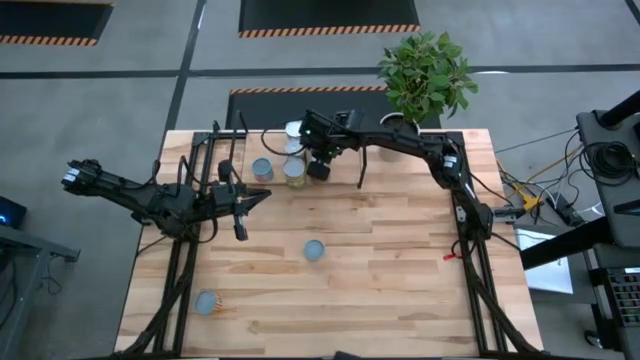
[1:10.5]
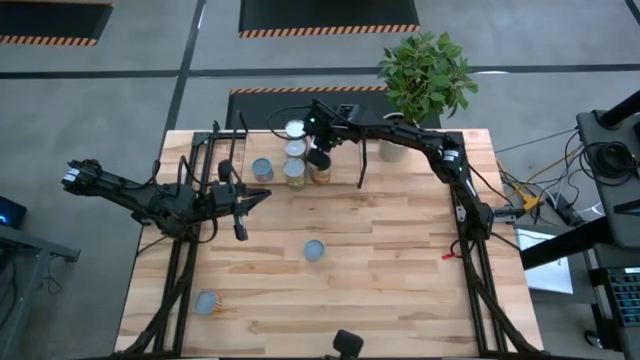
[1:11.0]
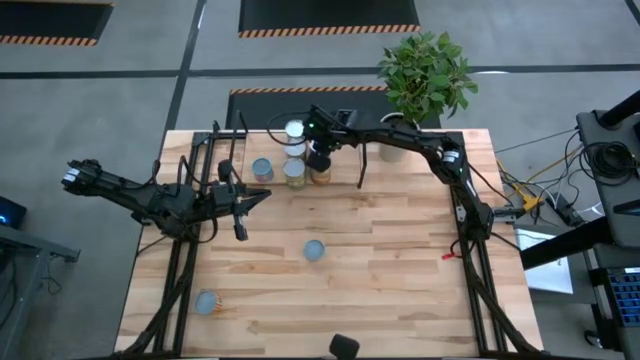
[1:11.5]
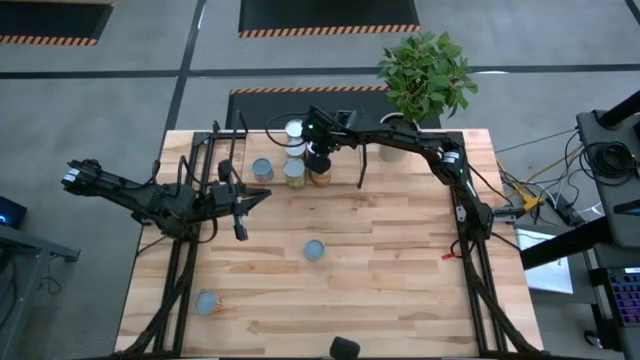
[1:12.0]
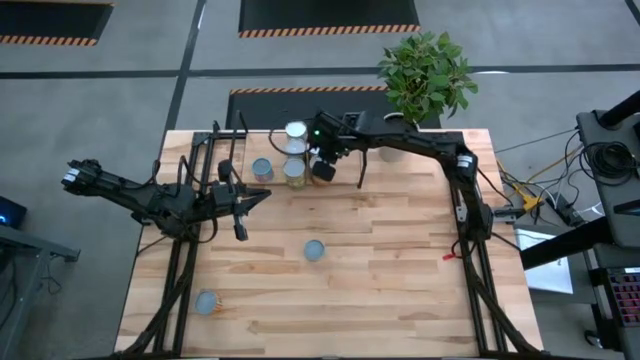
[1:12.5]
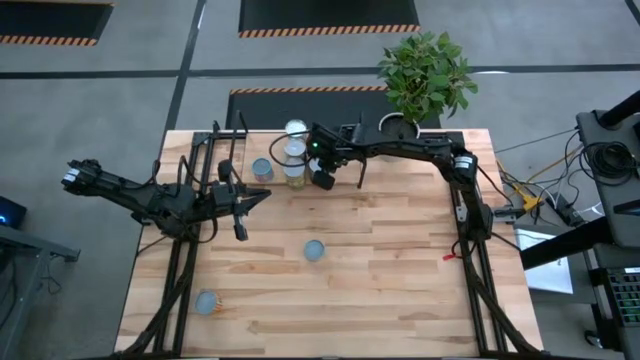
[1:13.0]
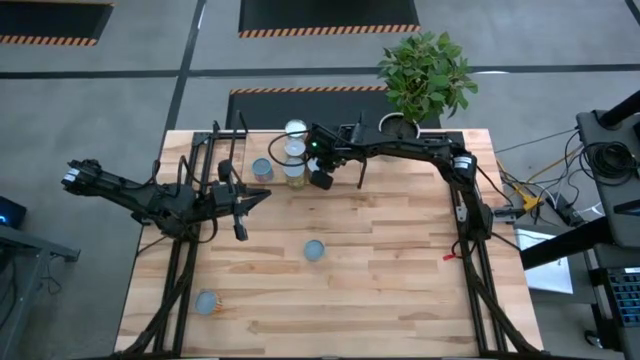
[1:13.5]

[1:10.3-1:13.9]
Task: Pick and place cans onto a shelf
Adjust the cans on the shelf

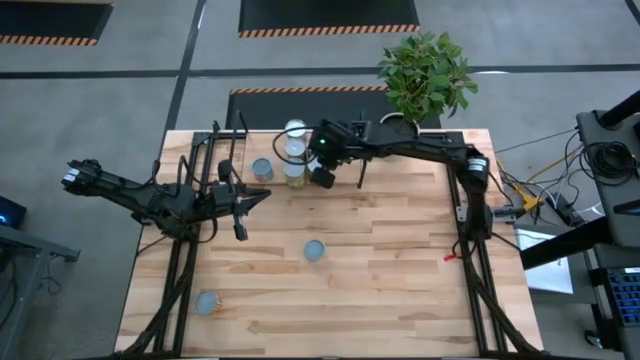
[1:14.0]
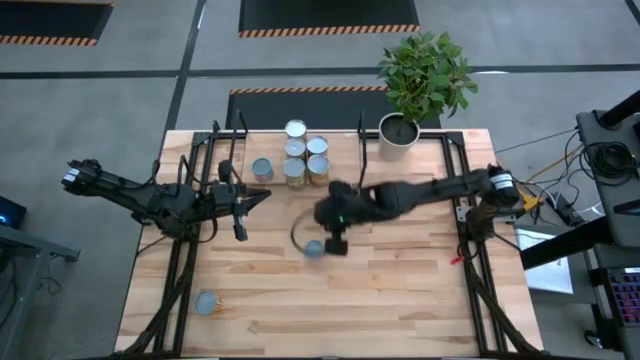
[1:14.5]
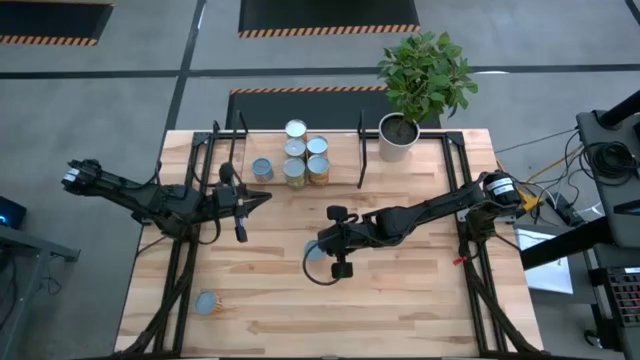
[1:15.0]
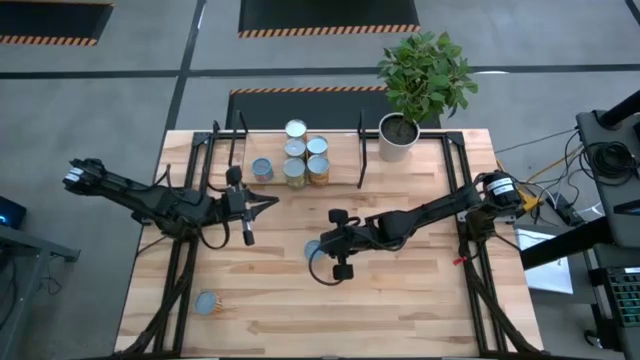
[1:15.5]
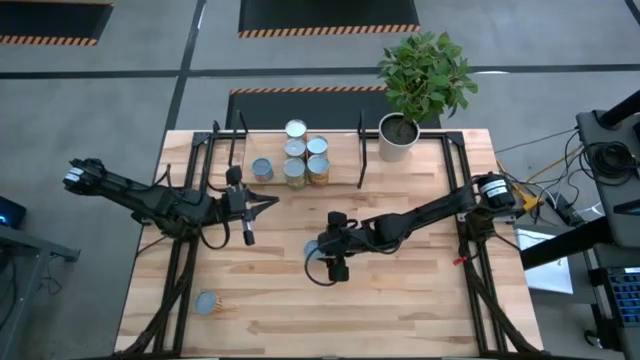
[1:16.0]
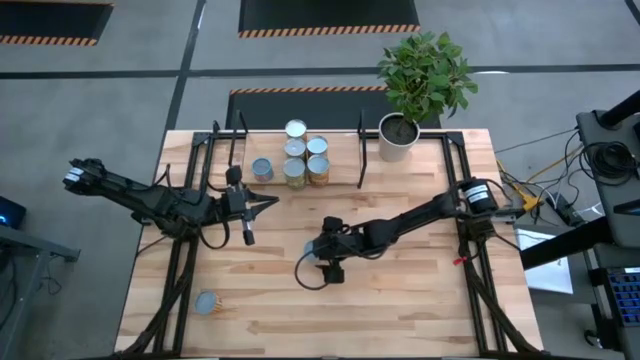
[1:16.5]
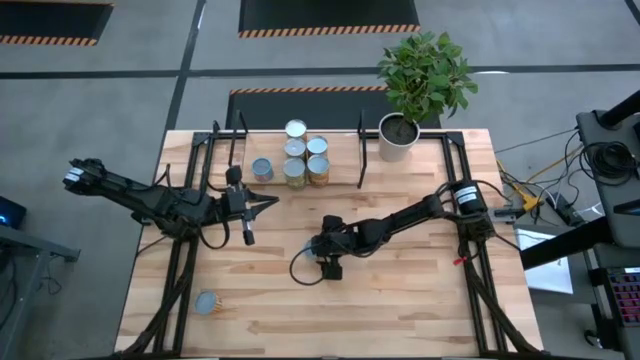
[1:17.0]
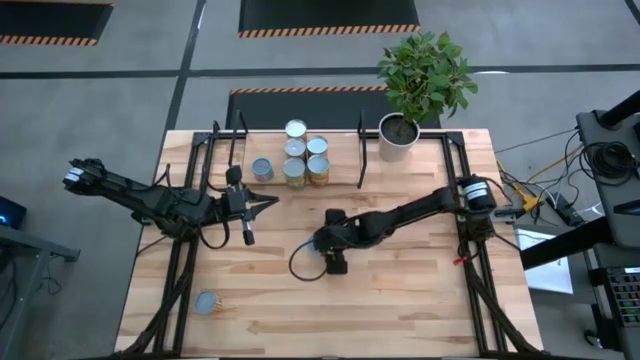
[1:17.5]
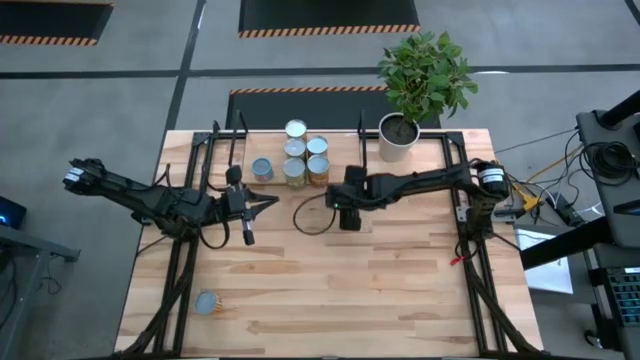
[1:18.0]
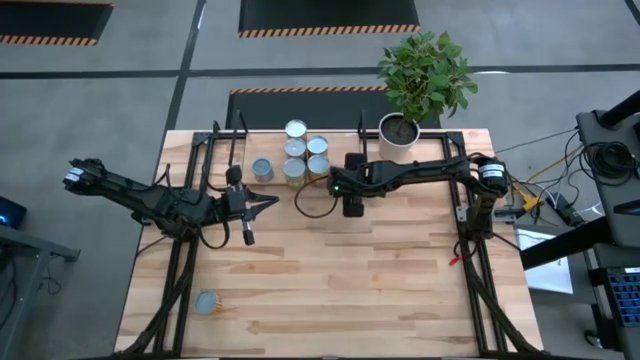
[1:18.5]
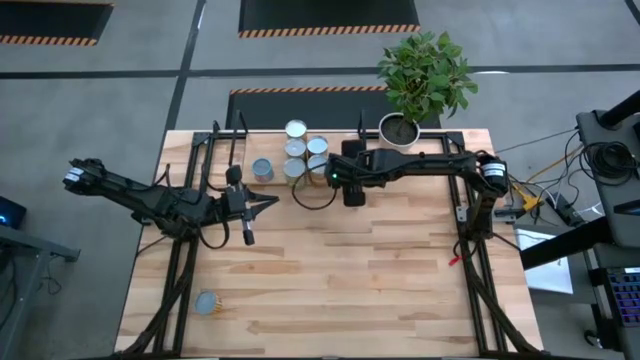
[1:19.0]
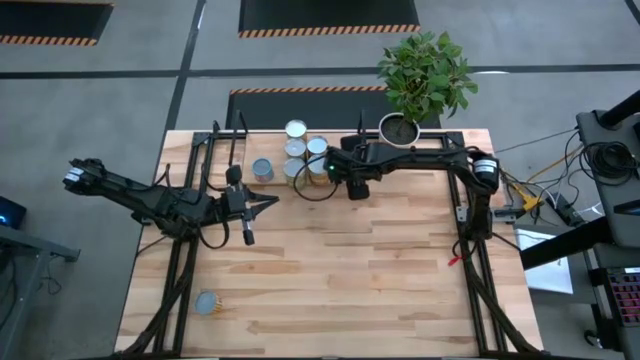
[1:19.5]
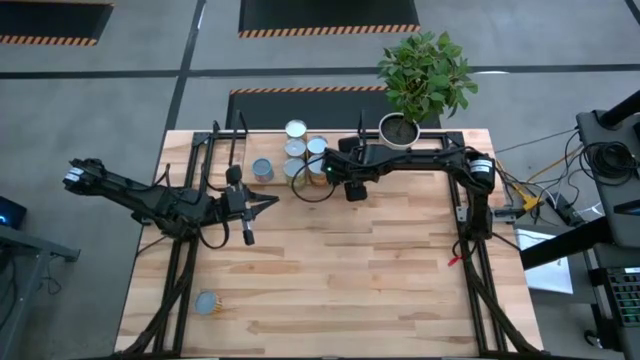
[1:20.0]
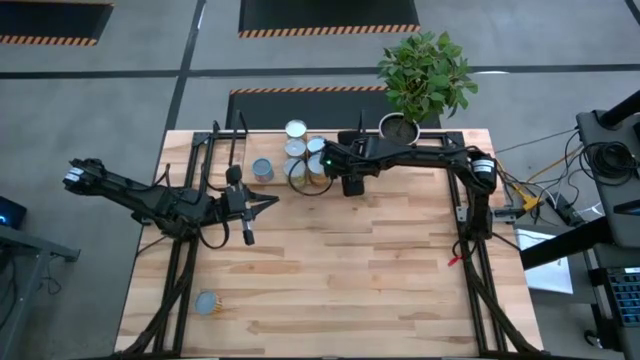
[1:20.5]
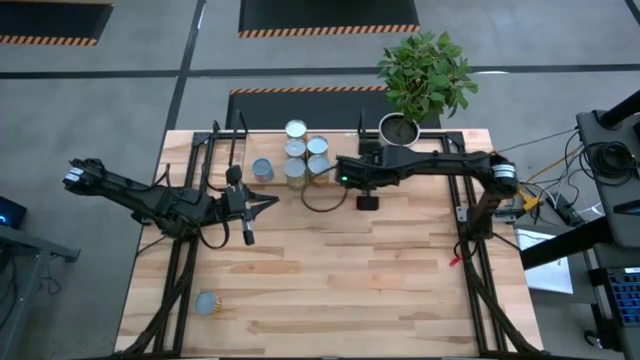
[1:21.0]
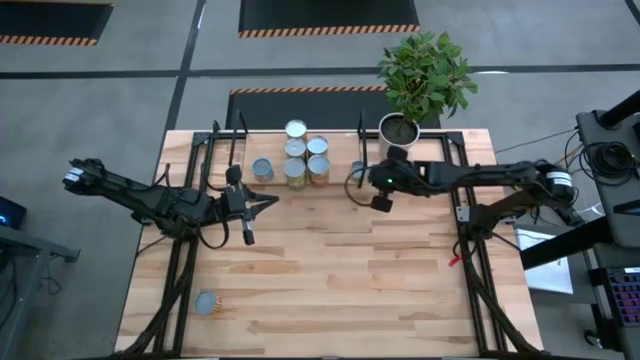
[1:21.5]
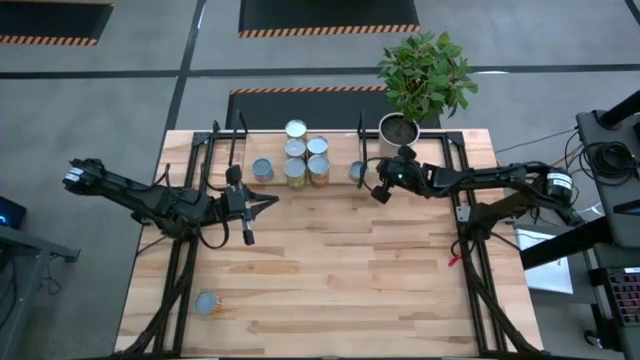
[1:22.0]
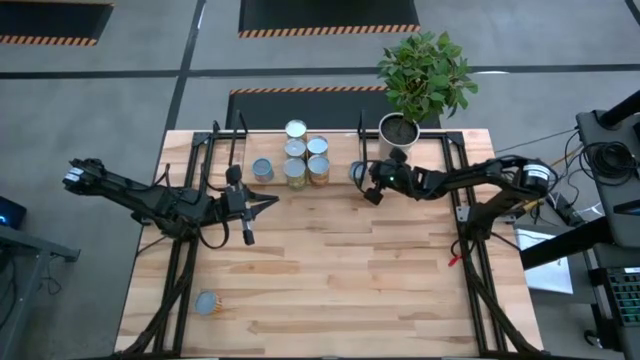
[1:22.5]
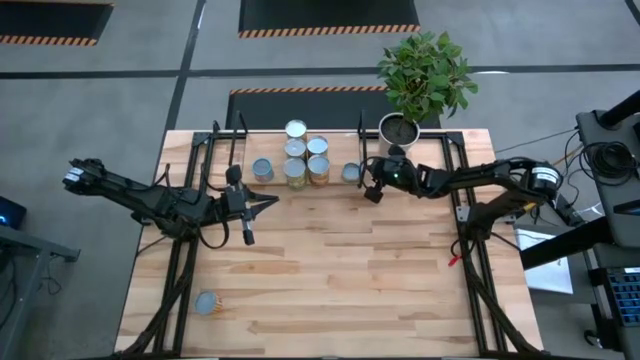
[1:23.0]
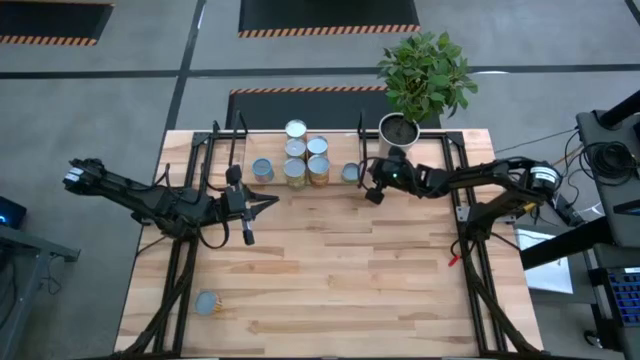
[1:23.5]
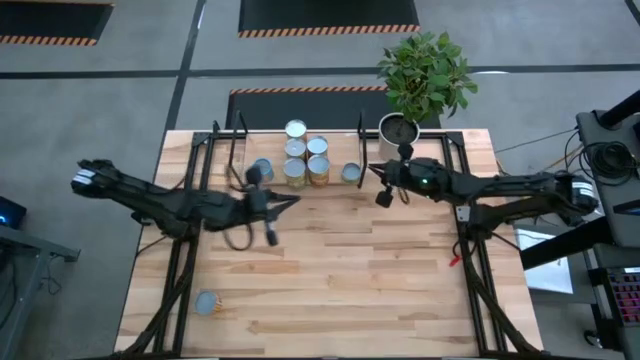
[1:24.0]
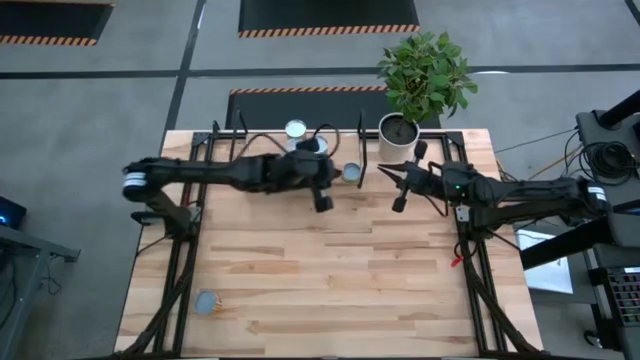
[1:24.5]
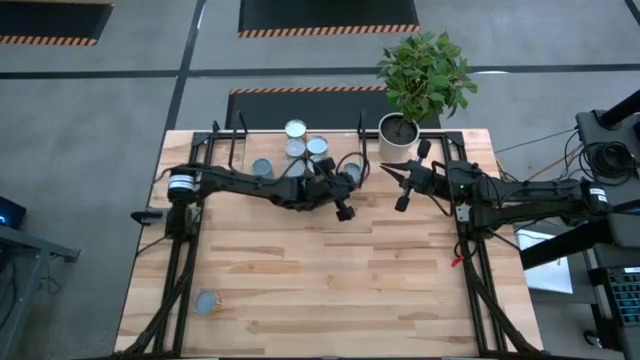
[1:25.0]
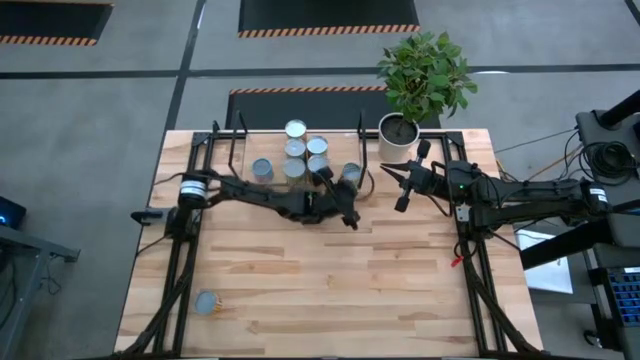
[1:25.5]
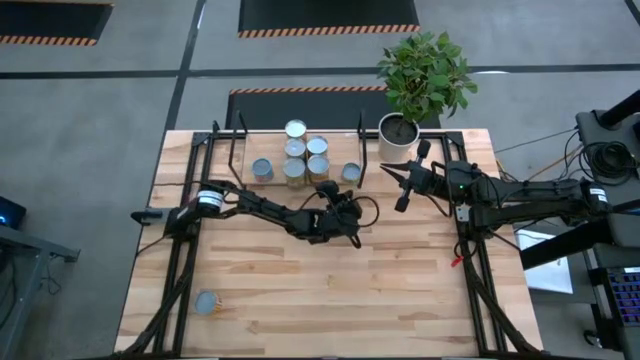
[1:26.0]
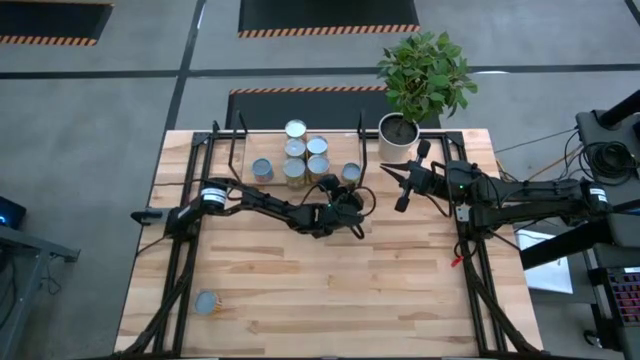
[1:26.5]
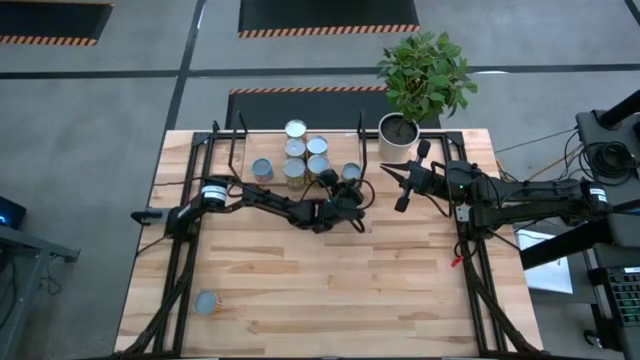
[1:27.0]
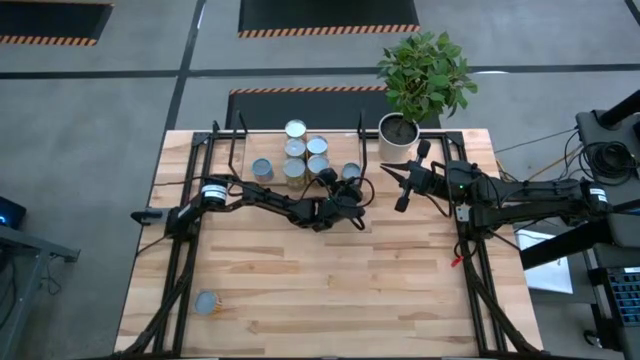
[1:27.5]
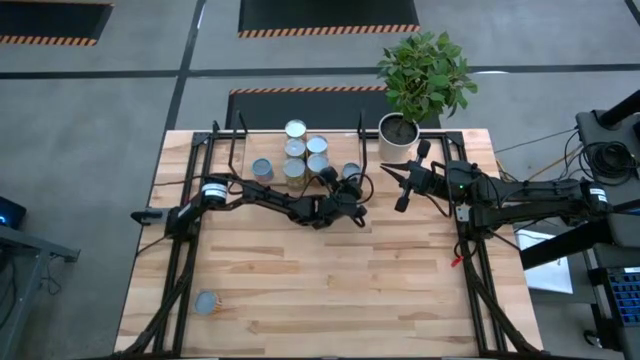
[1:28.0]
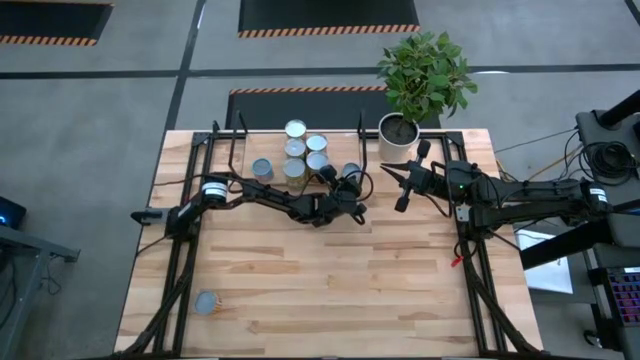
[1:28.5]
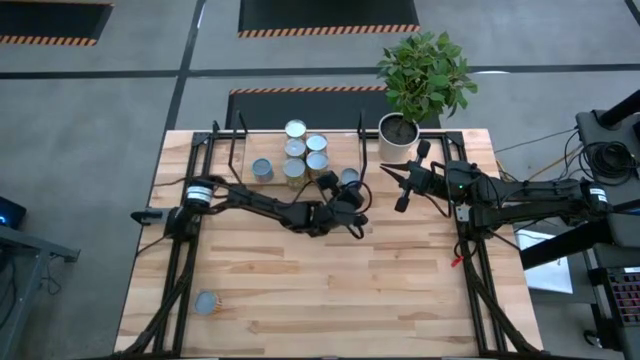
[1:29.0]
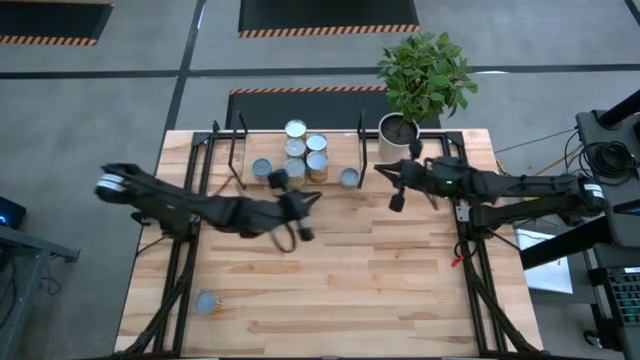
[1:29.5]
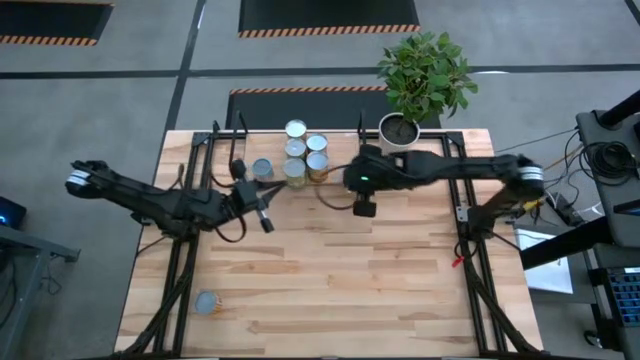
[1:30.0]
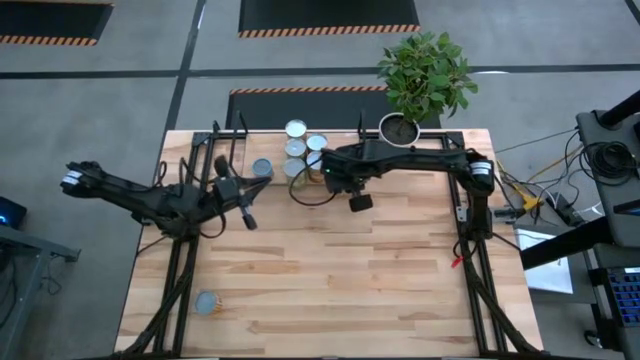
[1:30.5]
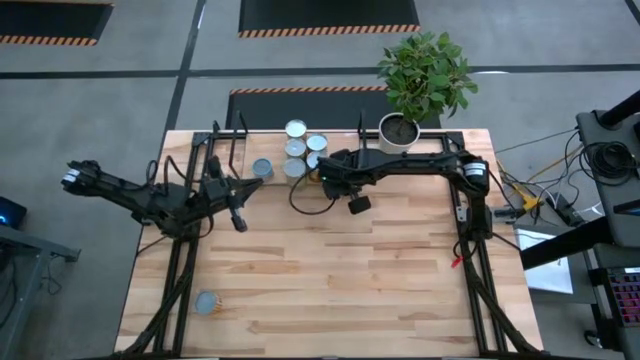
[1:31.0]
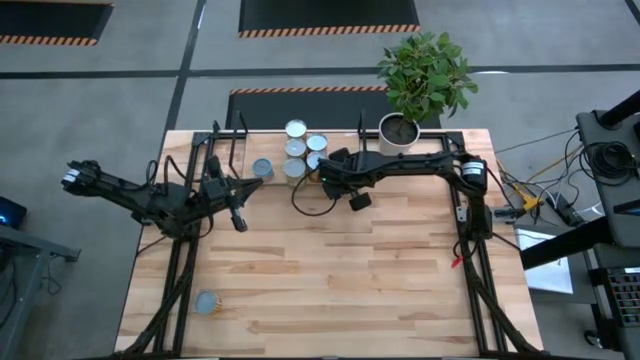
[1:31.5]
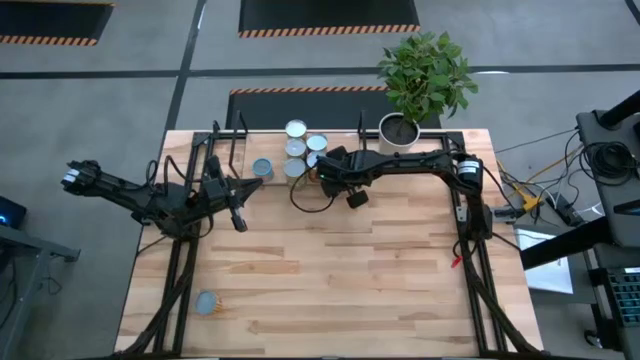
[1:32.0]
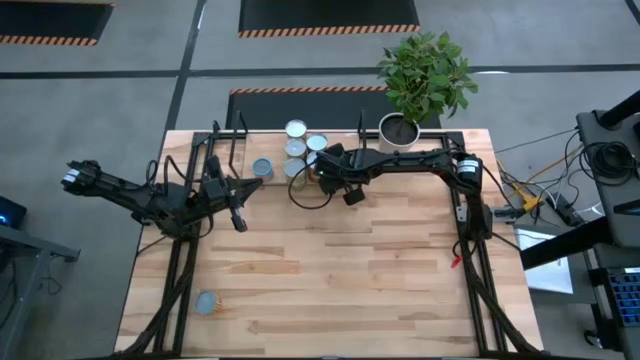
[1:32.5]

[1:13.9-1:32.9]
Put the canned mushrooms on the shelf
